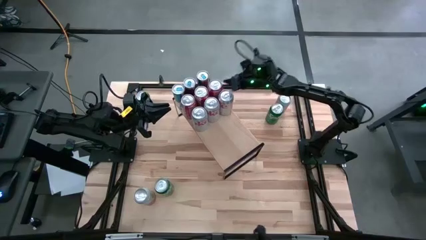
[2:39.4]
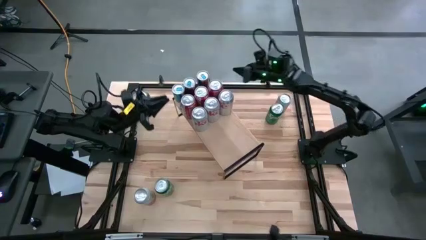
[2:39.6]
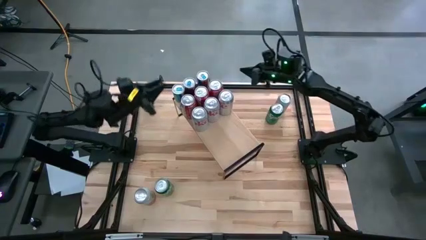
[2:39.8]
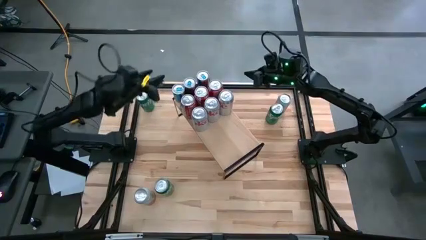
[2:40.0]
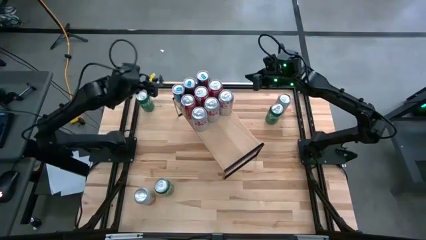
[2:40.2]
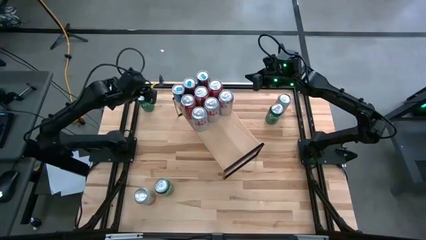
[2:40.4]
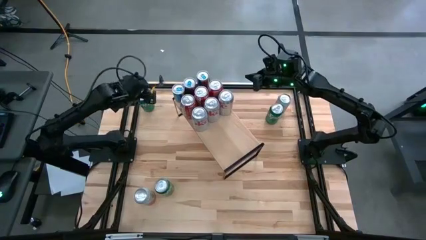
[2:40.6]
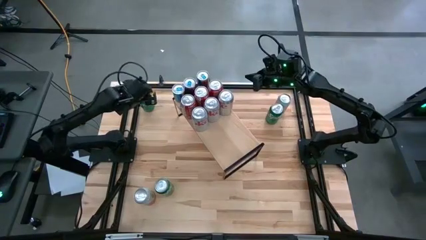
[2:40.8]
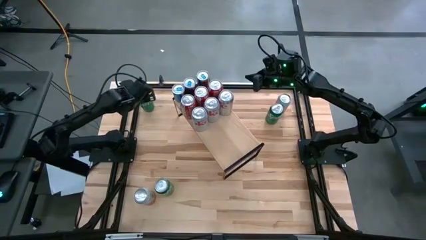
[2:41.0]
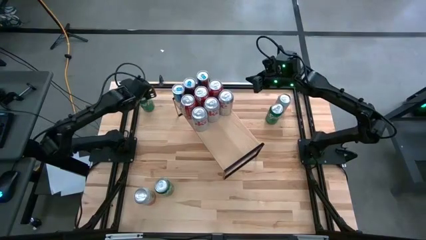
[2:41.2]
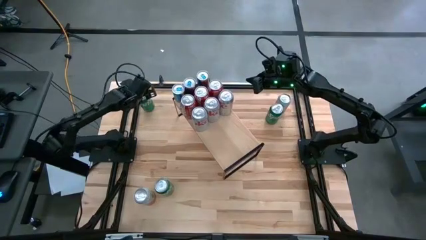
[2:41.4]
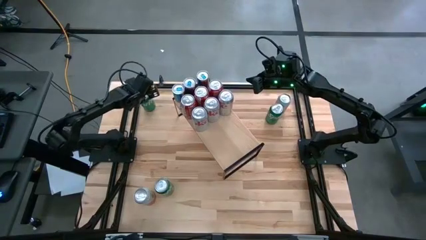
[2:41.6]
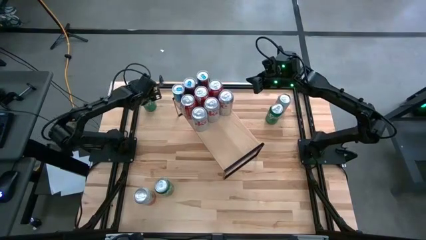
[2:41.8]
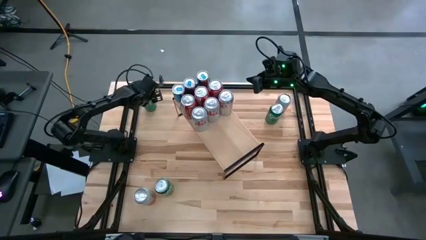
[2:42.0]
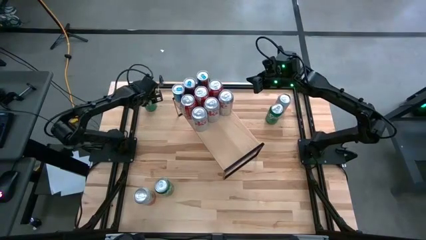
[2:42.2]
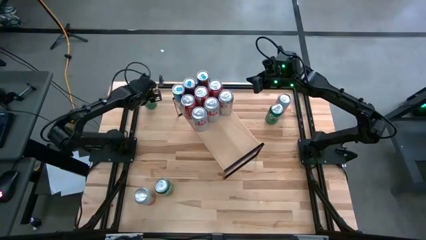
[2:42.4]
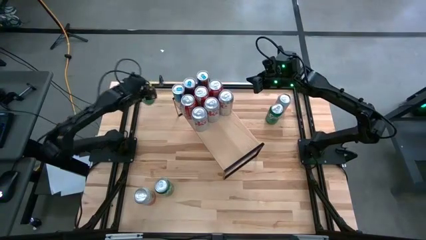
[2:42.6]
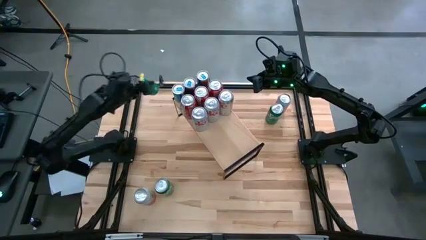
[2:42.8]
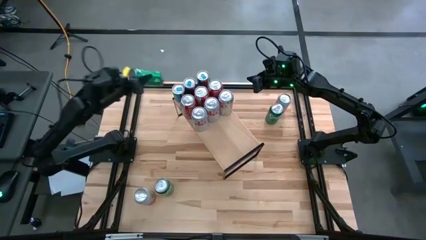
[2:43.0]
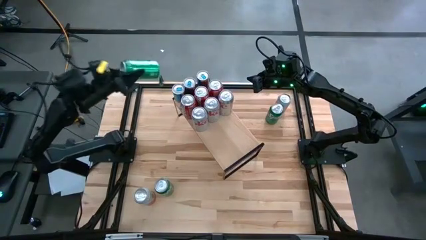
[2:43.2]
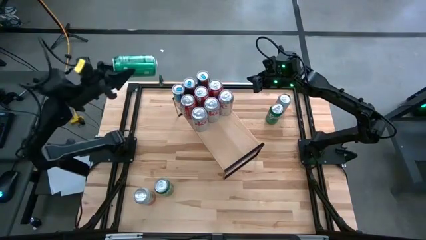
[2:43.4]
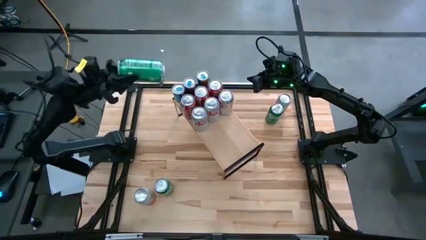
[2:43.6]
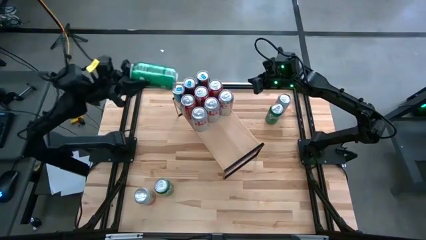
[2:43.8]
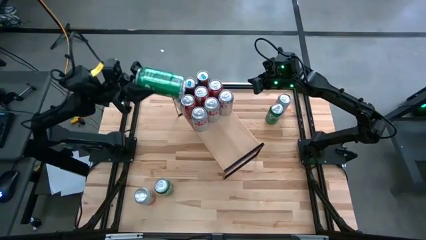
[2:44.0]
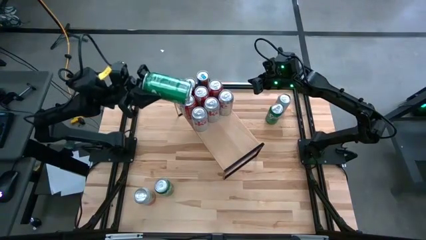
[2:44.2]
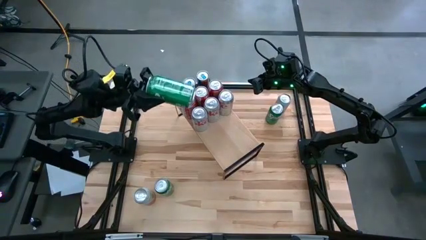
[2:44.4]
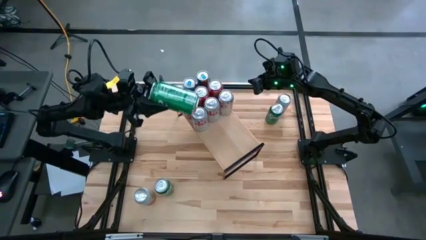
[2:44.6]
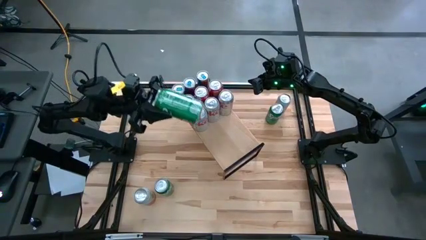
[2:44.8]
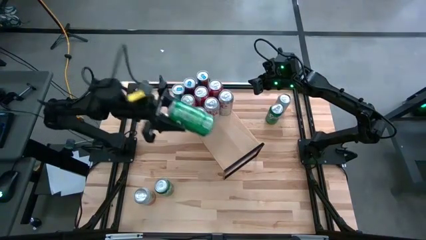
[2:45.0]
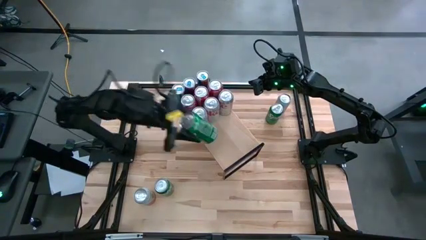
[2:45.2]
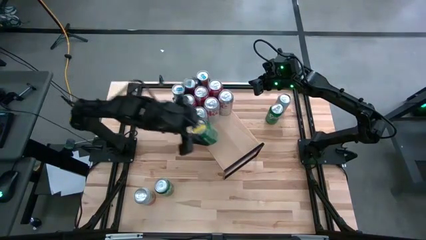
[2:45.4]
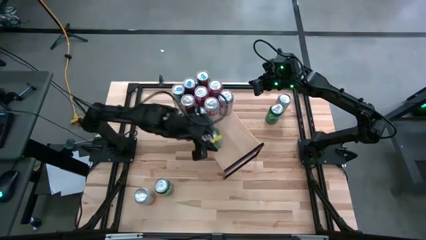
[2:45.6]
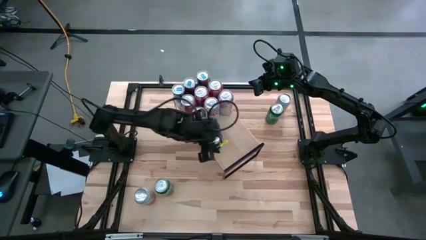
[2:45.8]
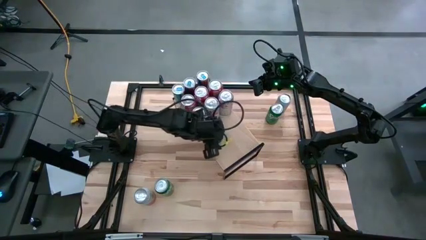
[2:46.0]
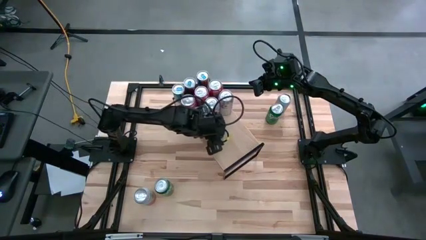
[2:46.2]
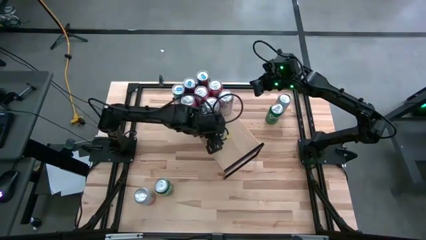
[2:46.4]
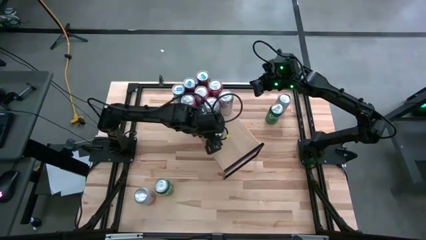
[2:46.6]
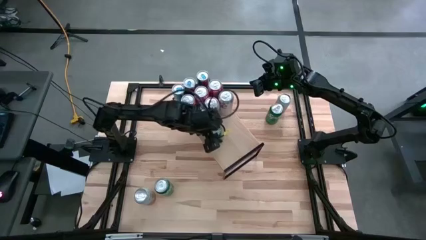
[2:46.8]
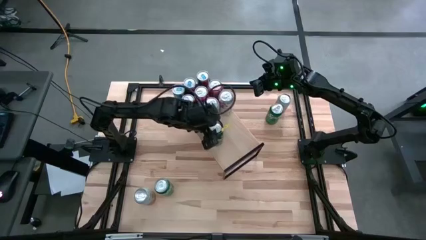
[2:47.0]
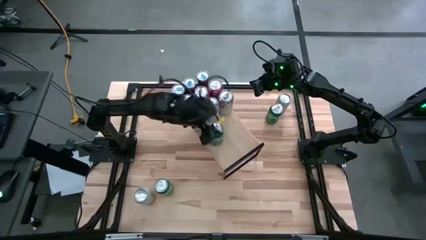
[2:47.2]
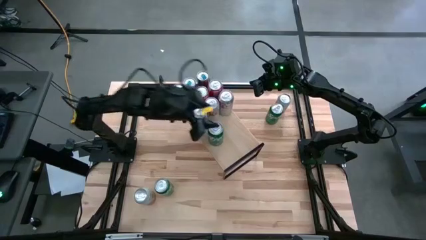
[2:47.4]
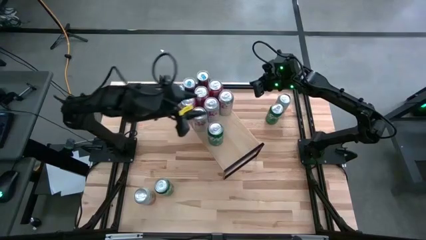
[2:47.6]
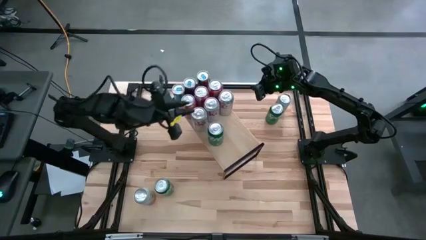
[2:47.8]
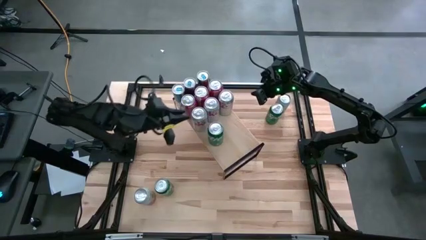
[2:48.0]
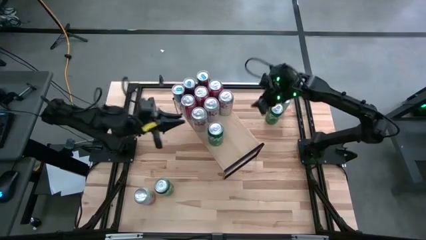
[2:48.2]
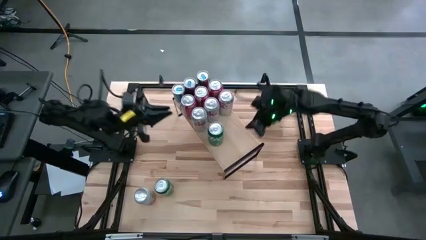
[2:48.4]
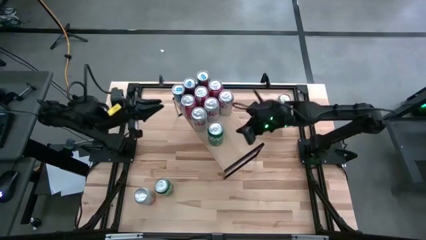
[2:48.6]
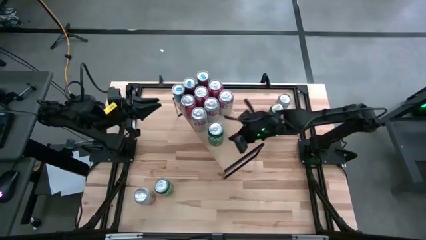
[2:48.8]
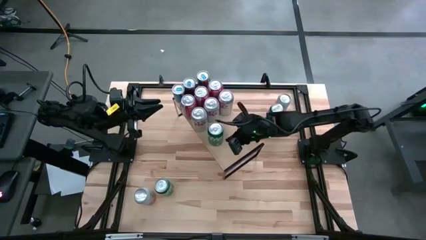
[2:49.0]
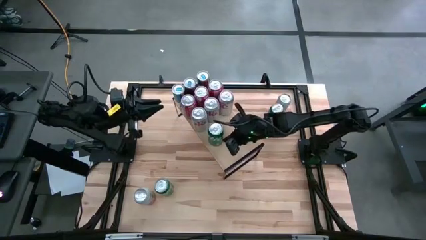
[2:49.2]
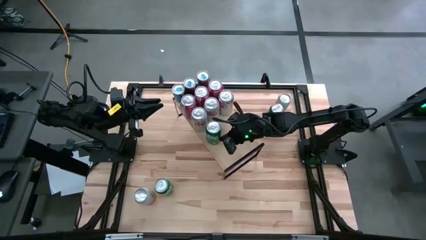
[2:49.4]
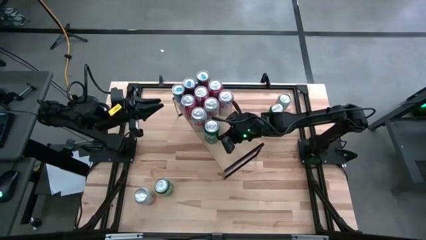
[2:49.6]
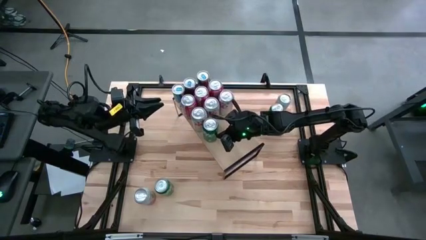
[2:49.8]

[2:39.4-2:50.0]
Task: Place canned beverage on shelf
Put the top left green soda can on the shelf
